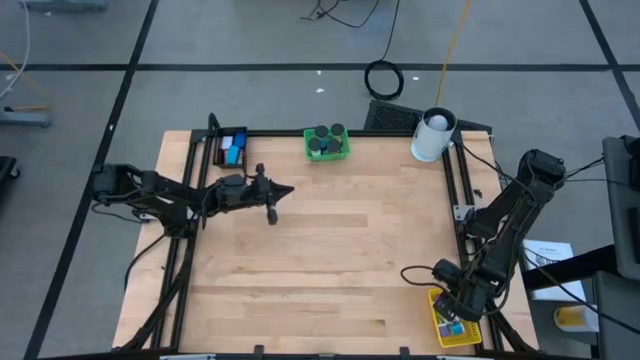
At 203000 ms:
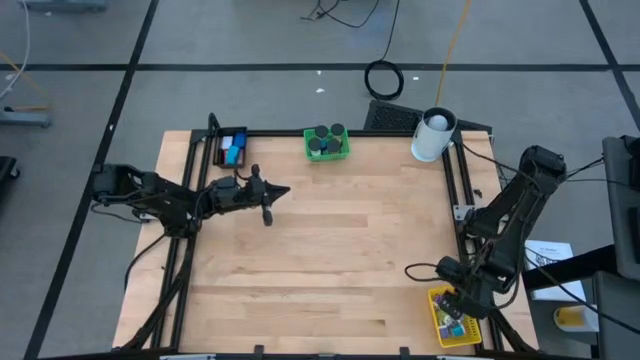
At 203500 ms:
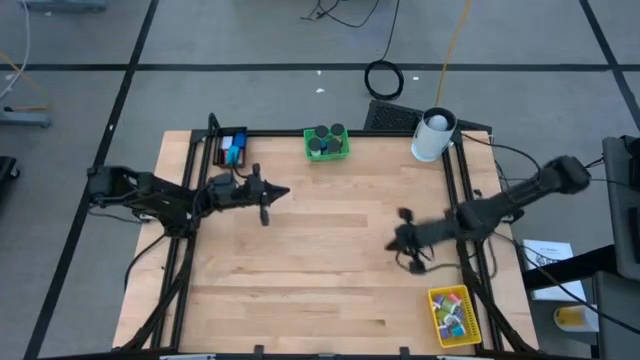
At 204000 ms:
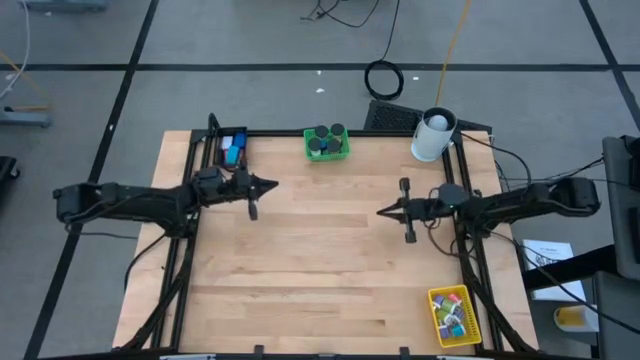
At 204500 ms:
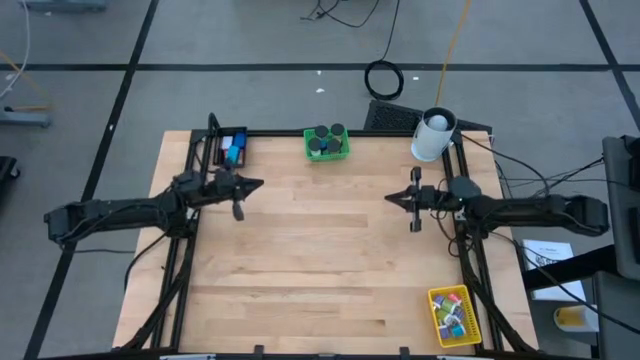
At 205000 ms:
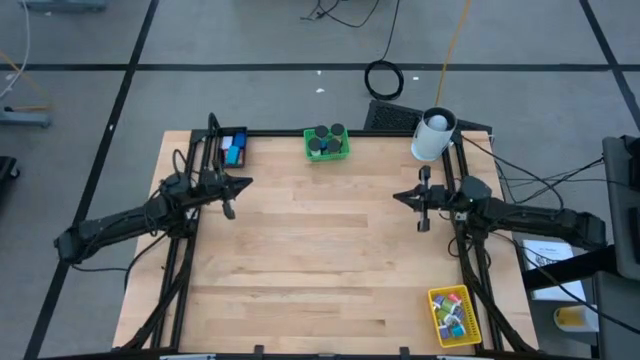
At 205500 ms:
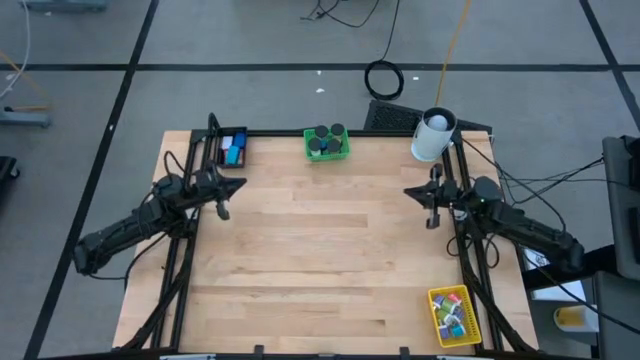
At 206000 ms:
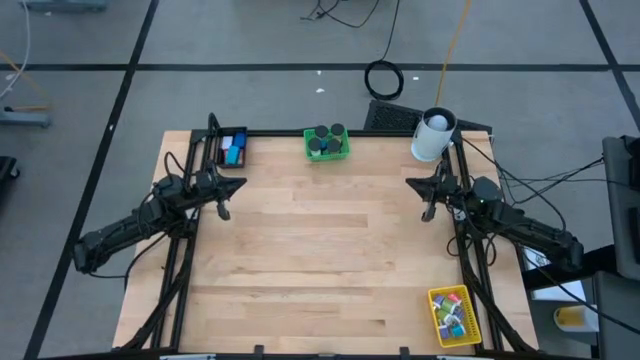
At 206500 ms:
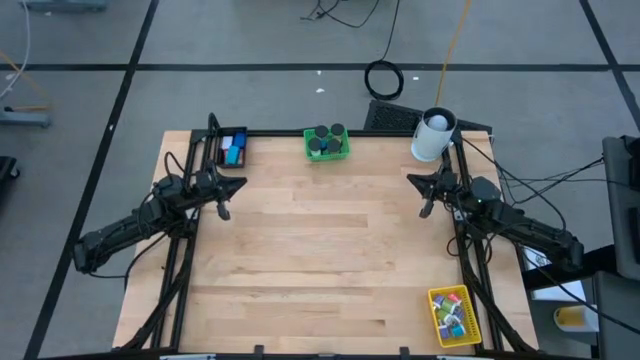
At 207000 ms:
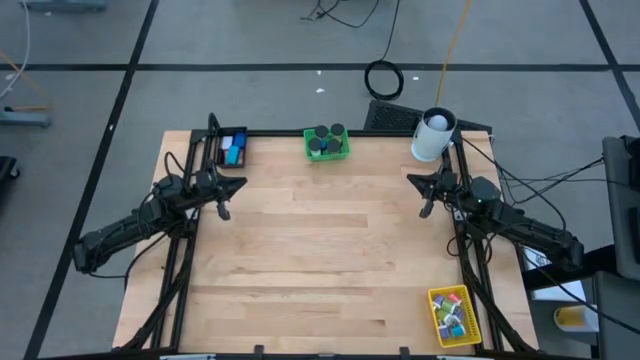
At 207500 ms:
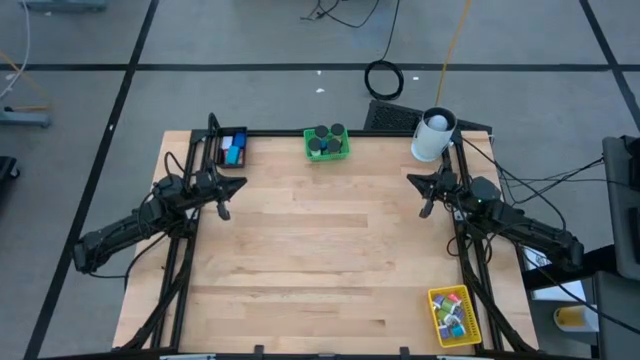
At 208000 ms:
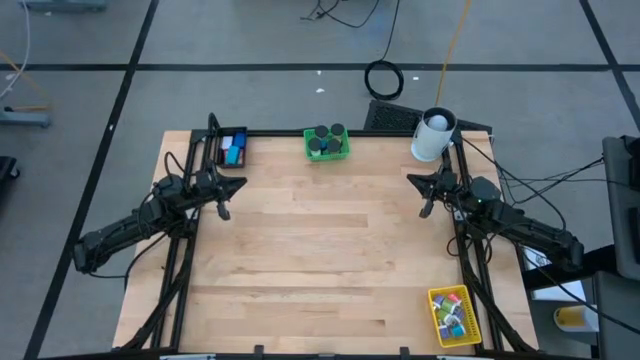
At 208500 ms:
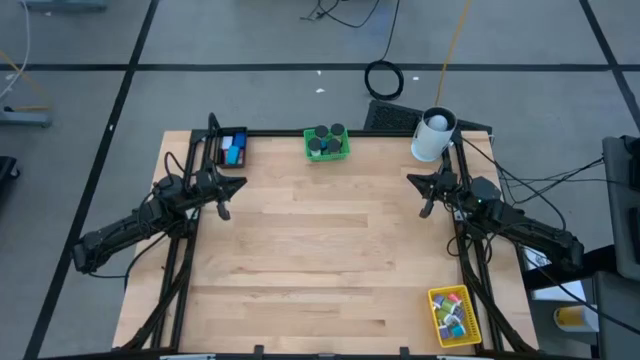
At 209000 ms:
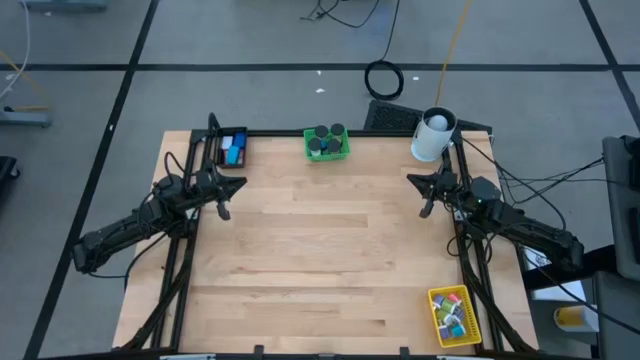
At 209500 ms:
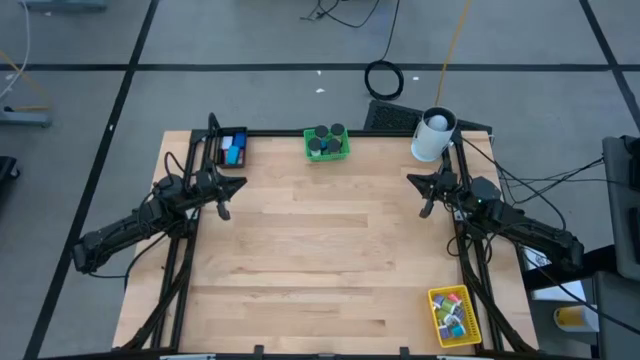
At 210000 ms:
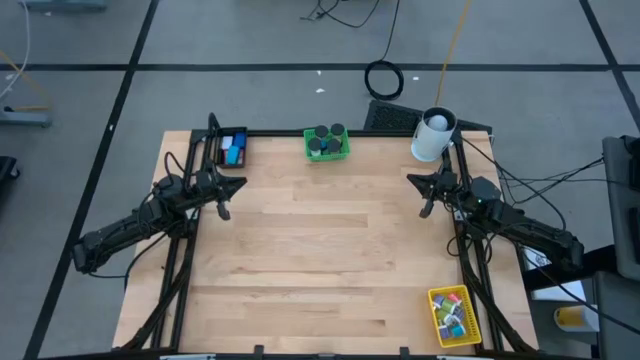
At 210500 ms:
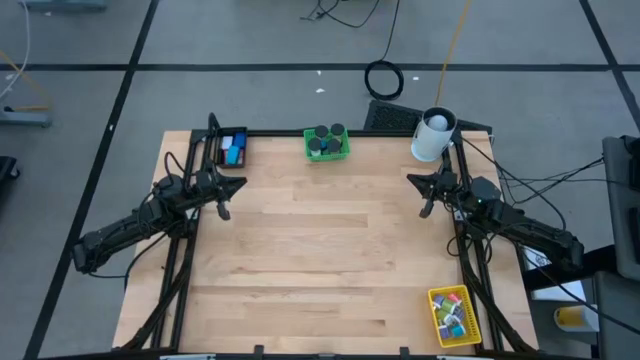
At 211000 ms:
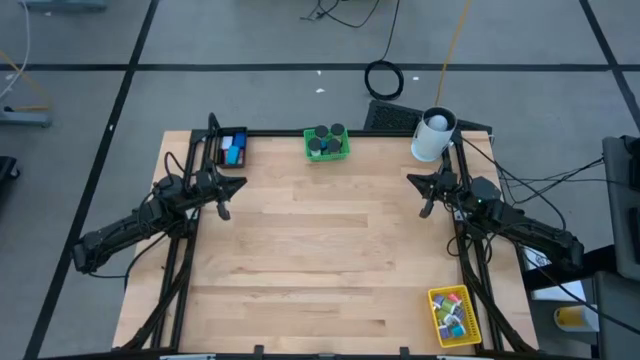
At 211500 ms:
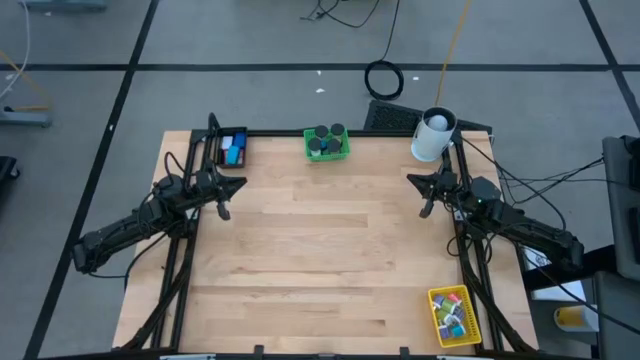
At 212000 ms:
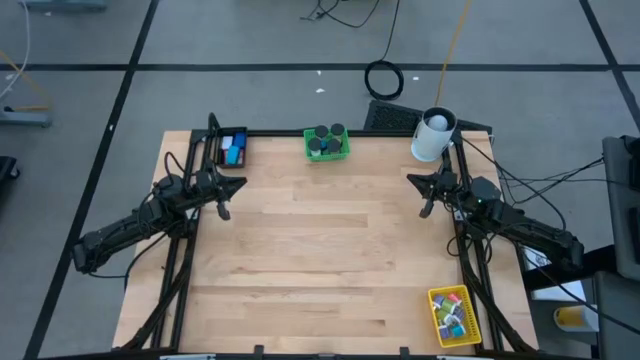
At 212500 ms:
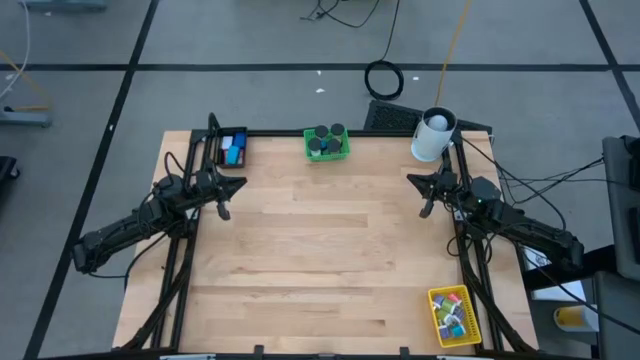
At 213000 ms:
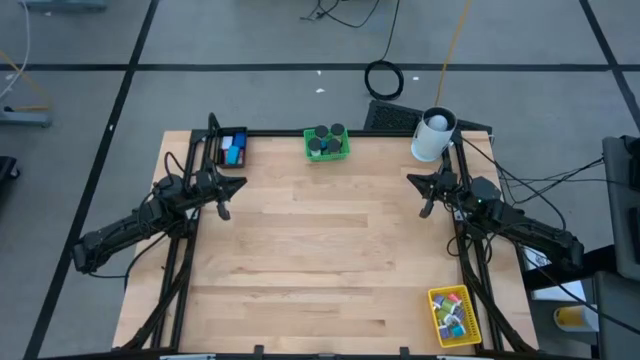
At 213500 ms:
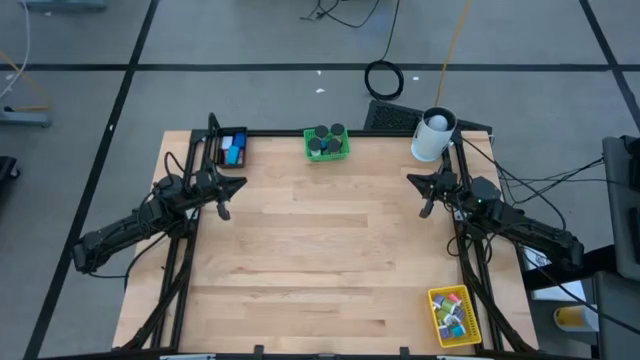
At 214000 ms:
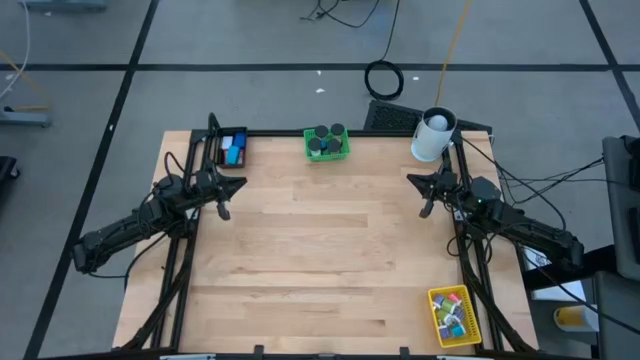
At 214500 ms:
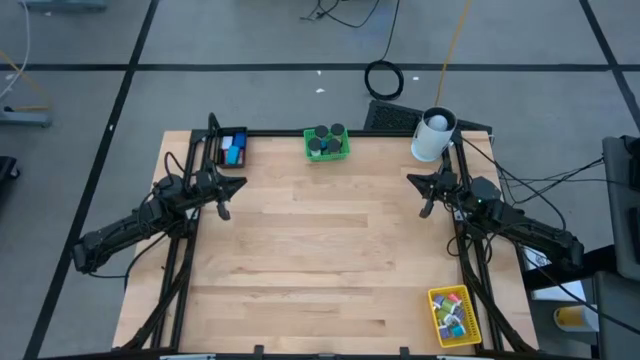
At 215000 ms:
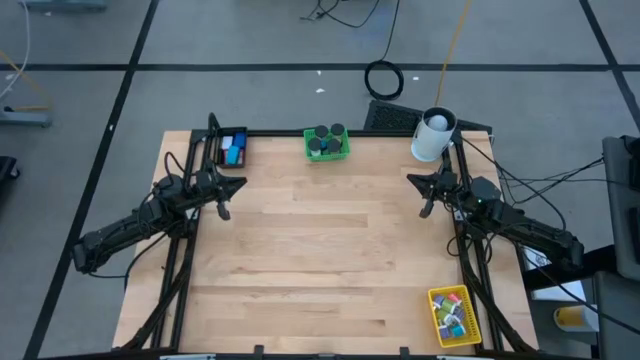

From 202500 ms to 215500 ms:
Task: Pick & Place Office items
Return to Home Position

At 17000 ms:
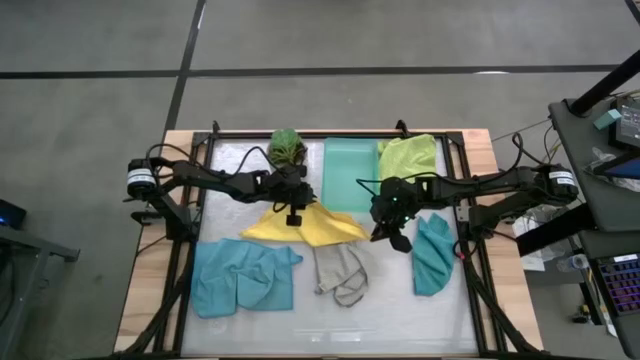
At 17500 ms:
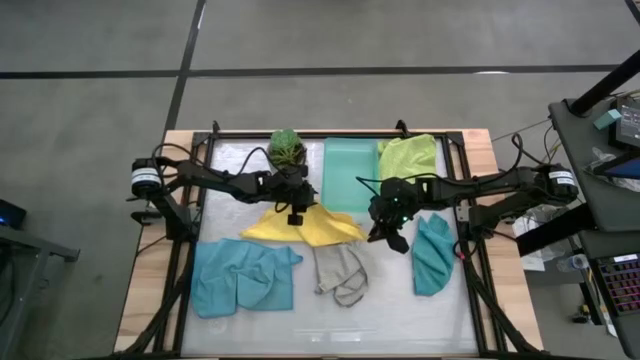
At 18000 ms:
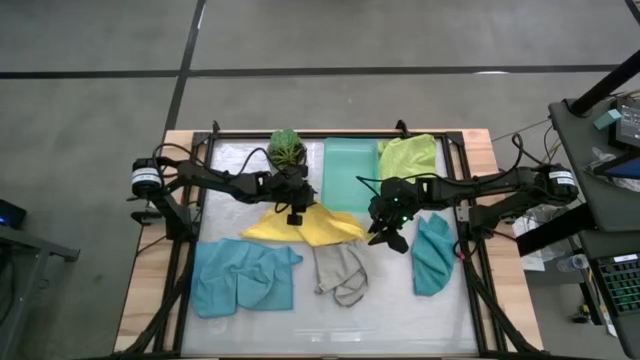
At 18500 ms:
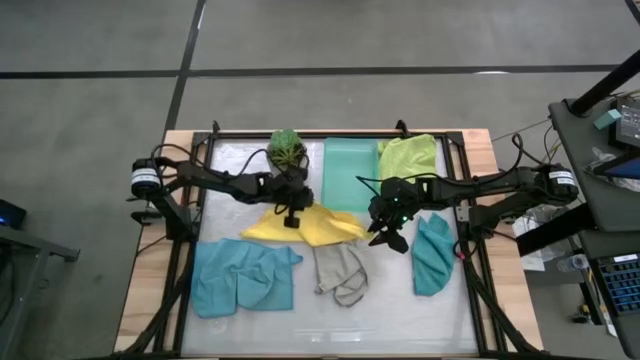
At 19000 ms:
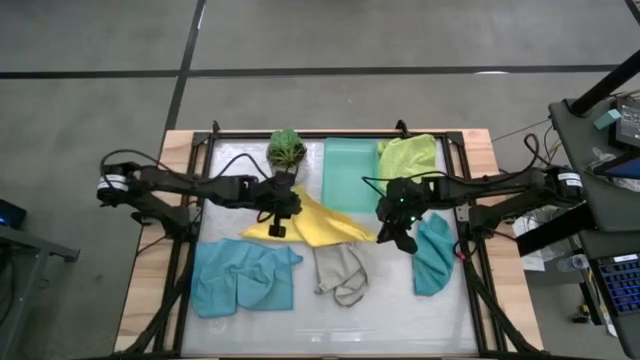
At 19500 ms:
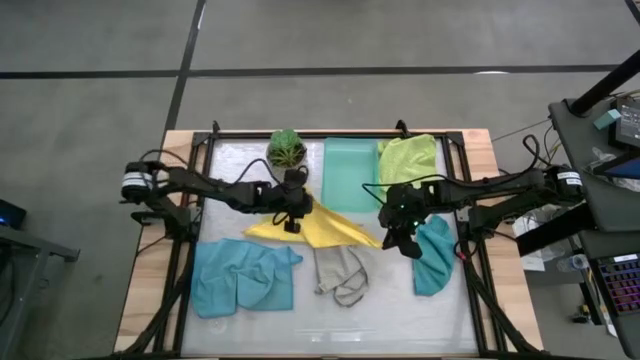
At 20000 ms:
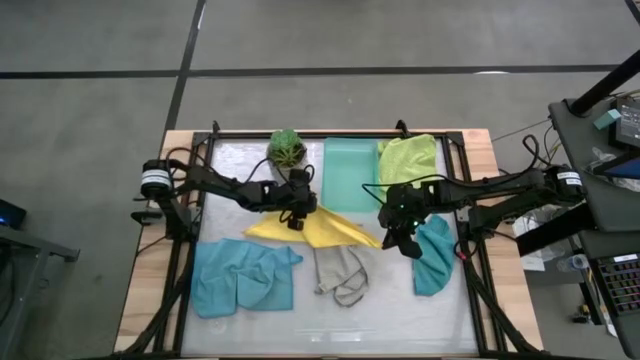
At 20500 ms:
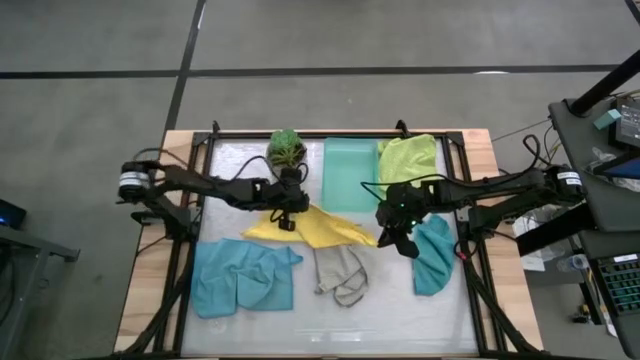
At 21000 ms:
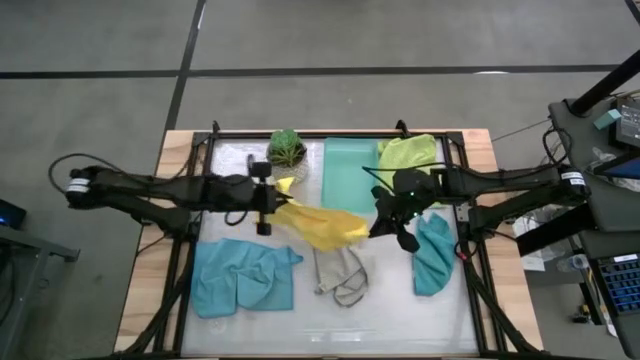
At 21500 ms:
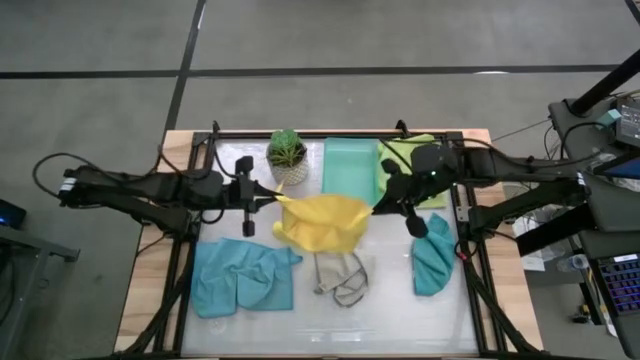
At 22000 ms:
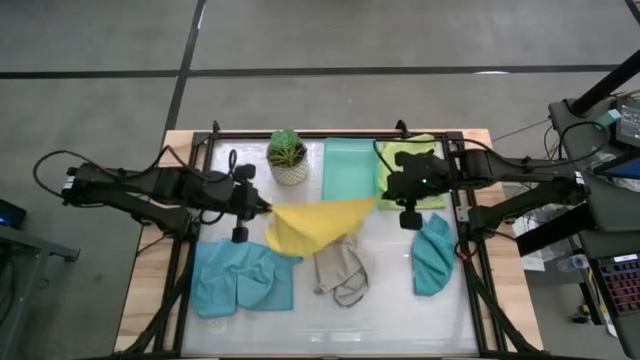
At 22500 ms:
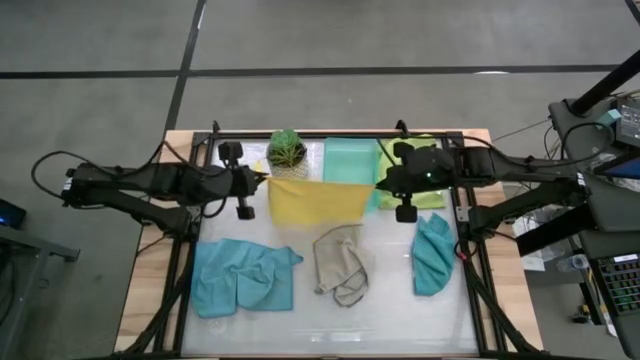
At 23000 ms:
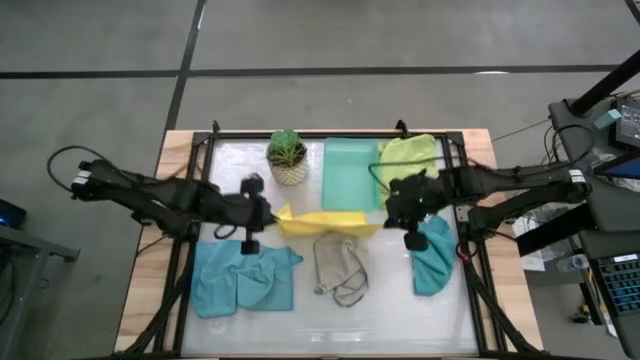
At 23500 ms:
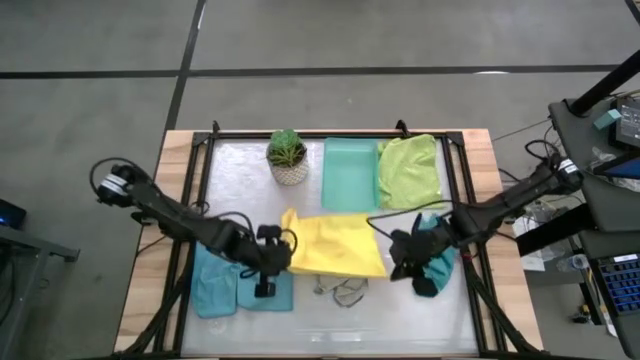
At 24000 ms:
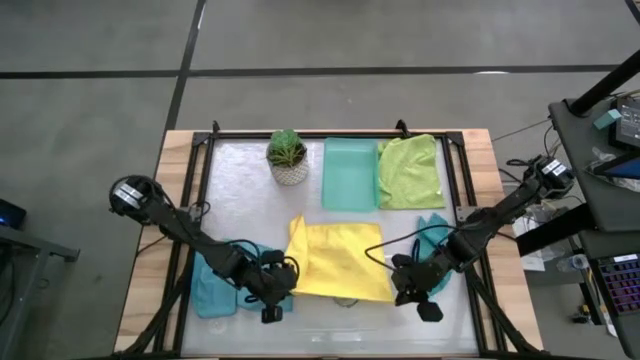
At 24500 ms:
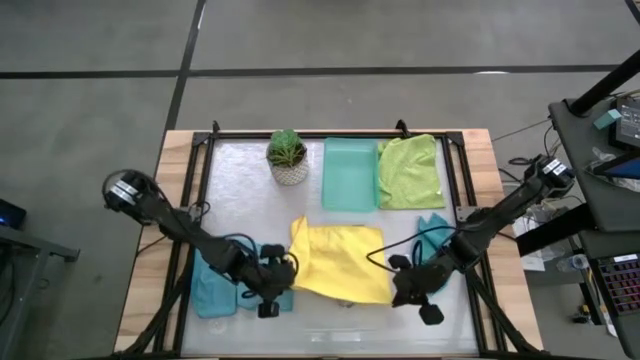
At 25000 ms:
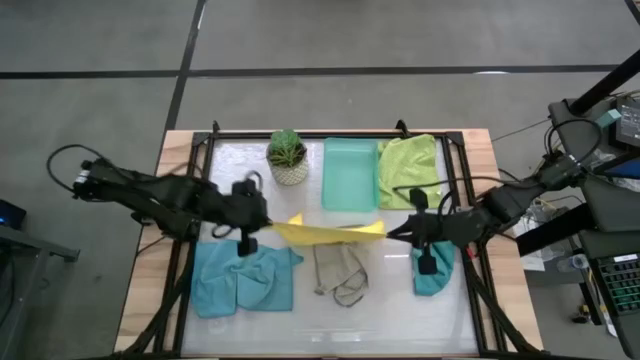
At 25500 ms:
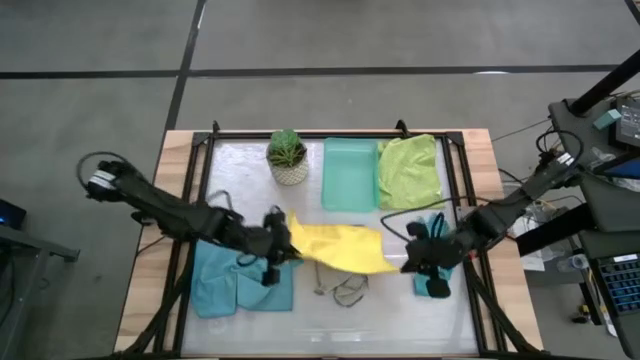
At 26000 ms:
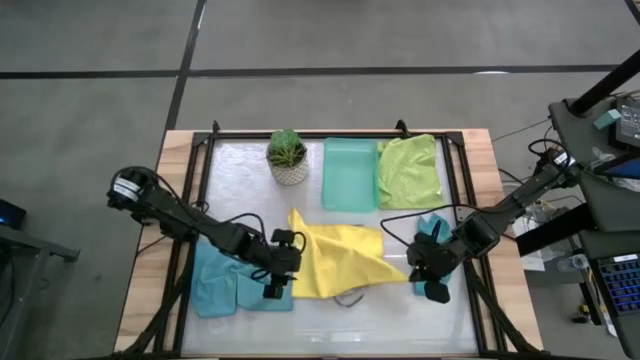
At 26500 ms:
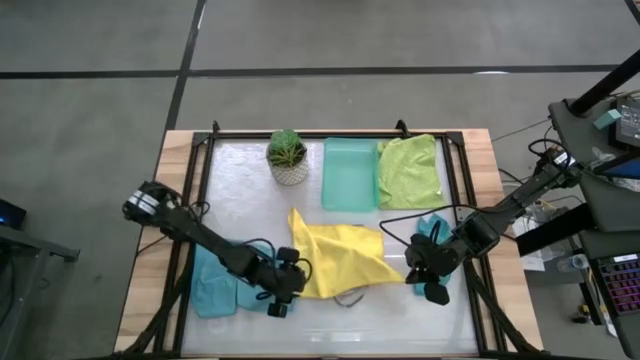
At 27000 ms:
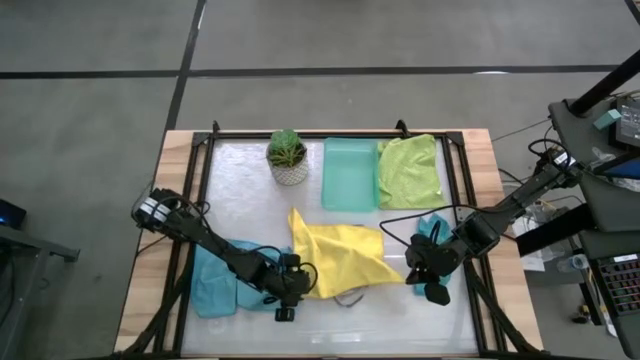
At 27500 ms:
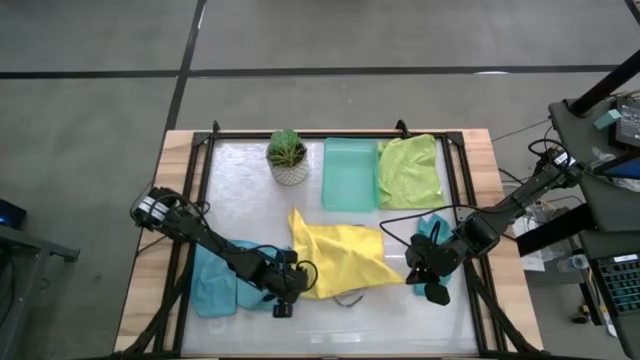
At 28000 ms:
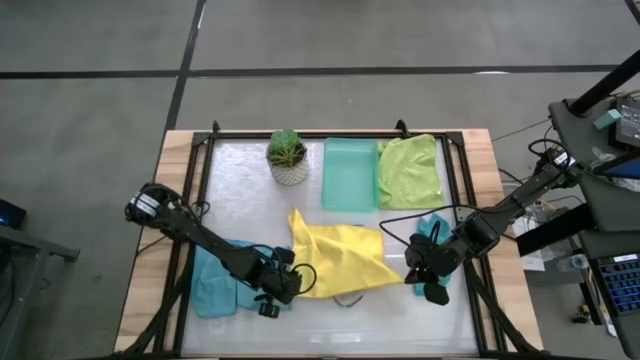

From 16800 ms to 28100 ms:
Task: Fold microfiber towels
Fold the yellow microfiber cloth
